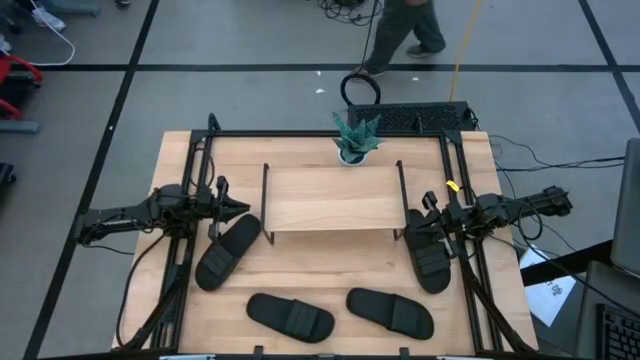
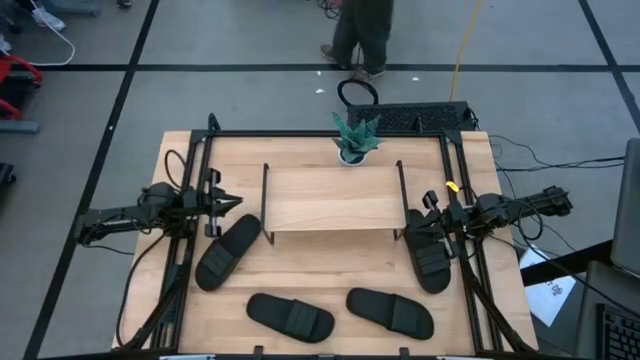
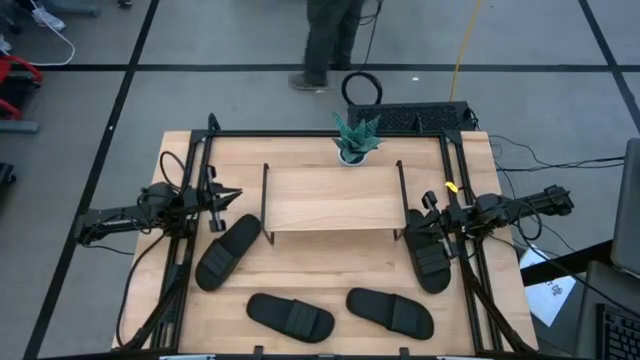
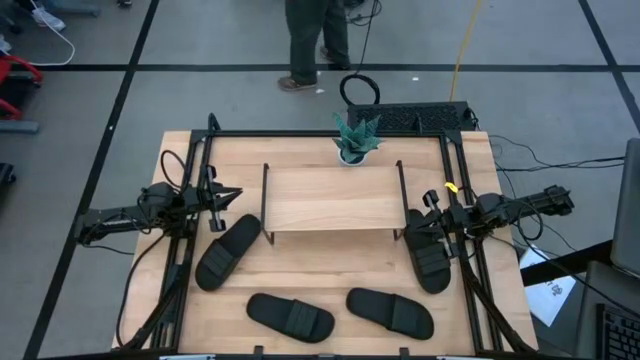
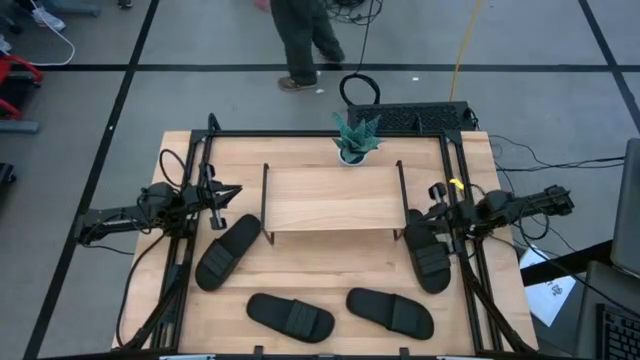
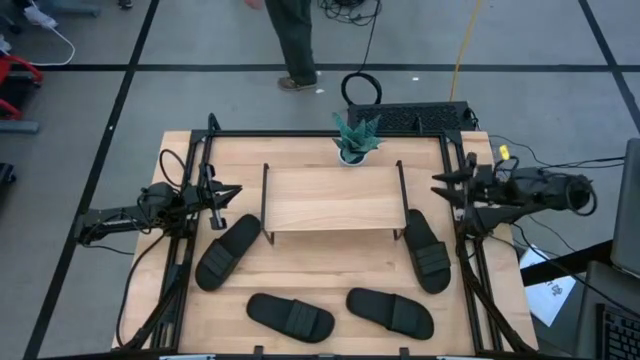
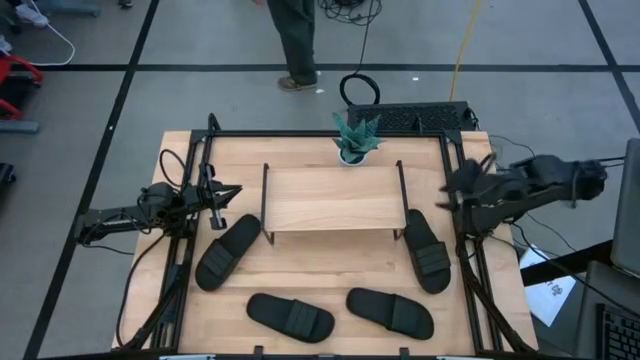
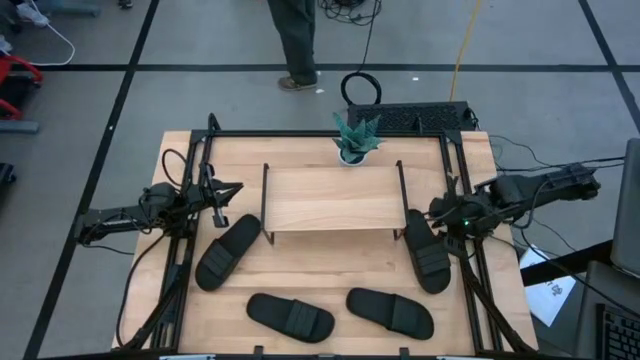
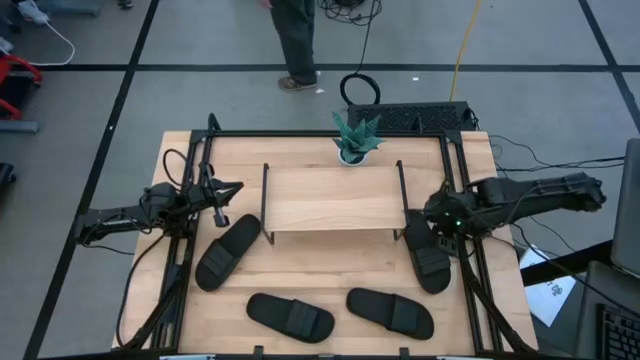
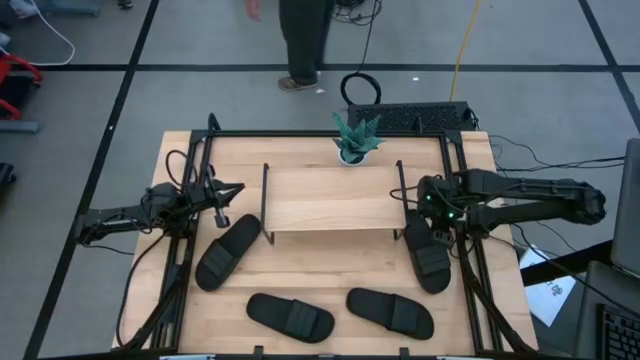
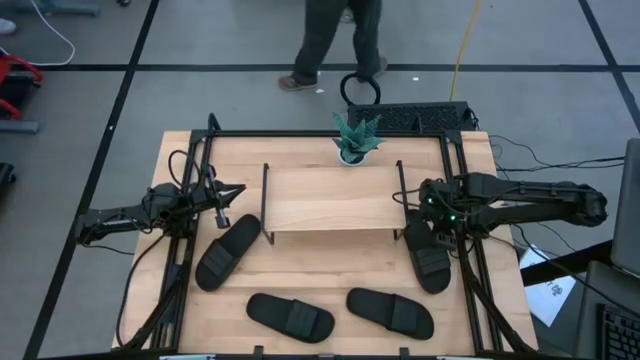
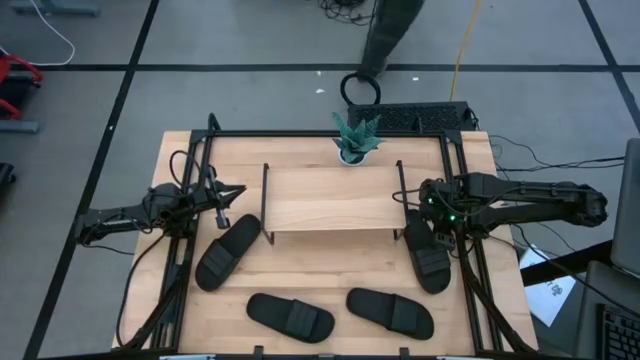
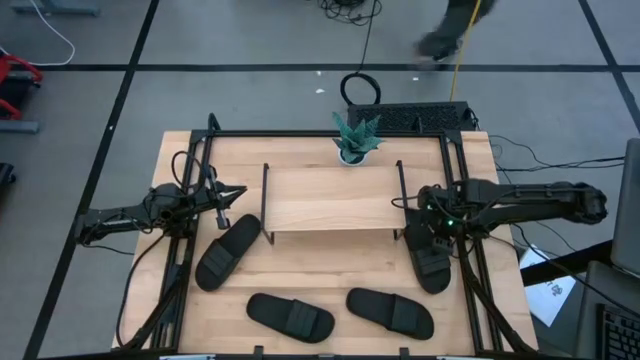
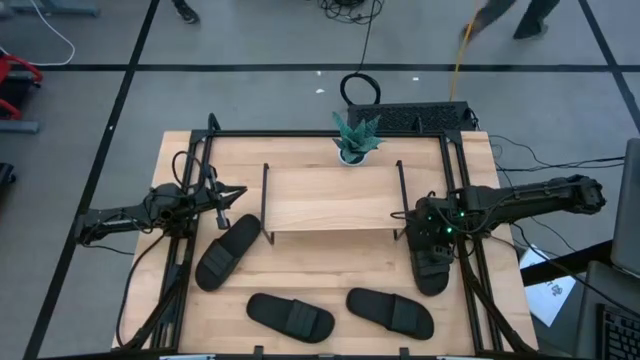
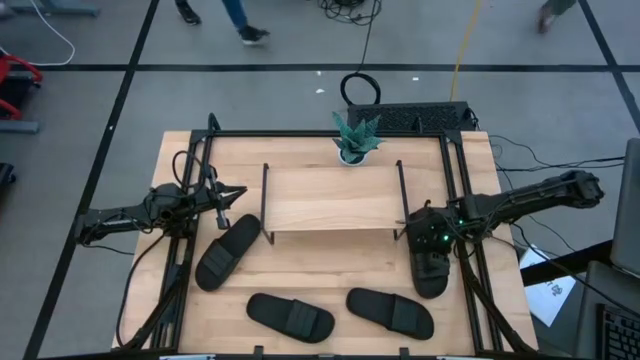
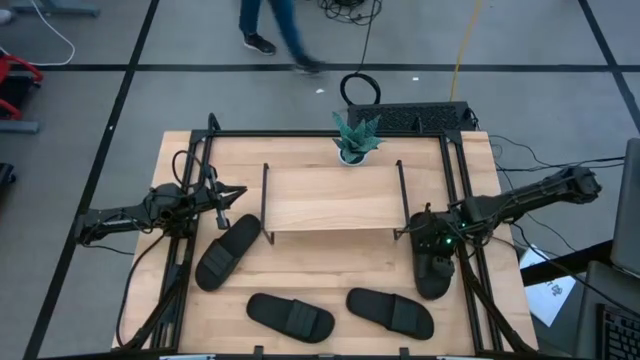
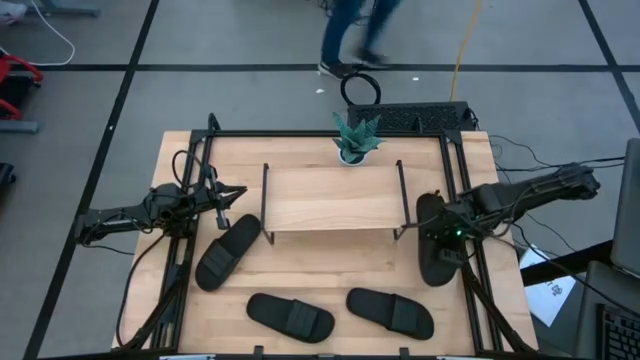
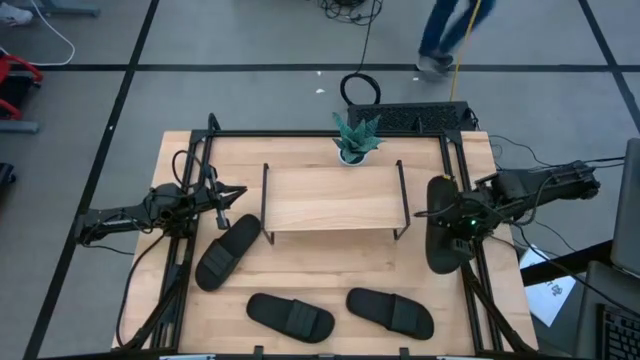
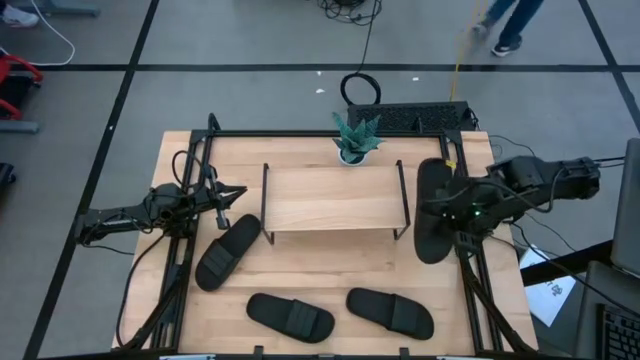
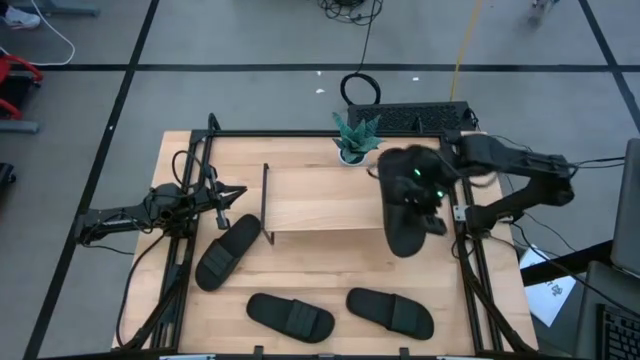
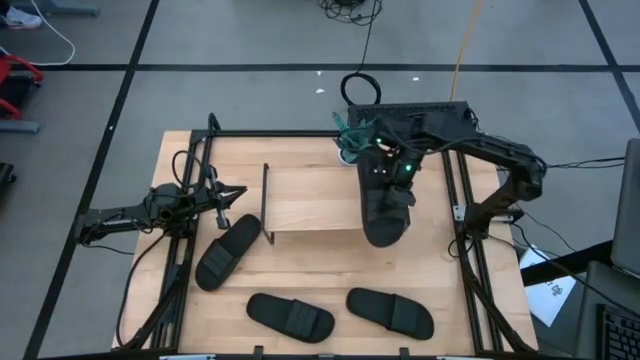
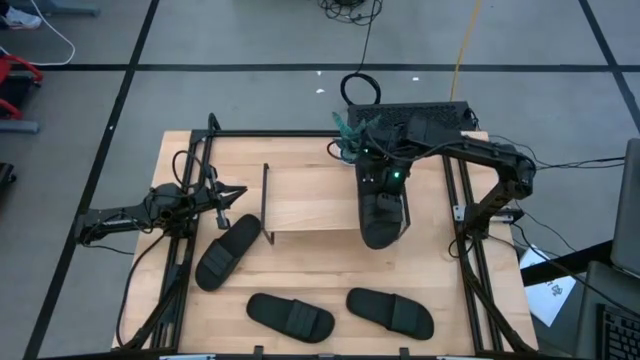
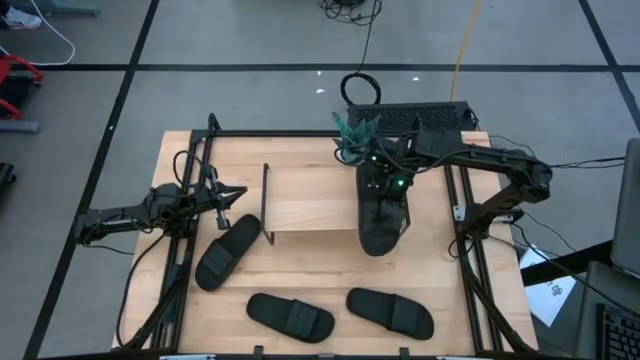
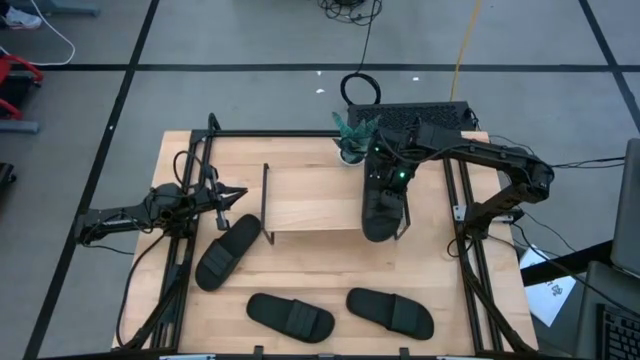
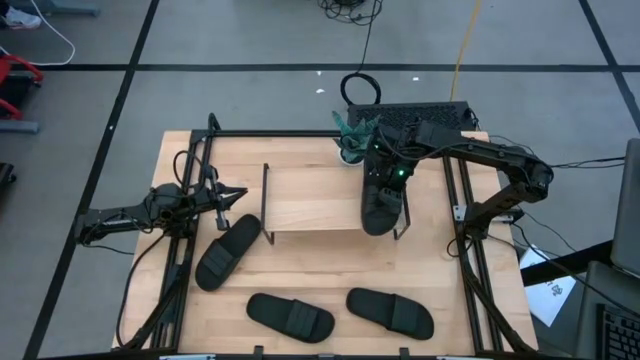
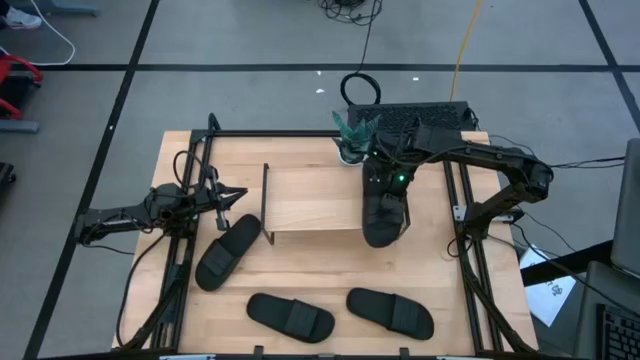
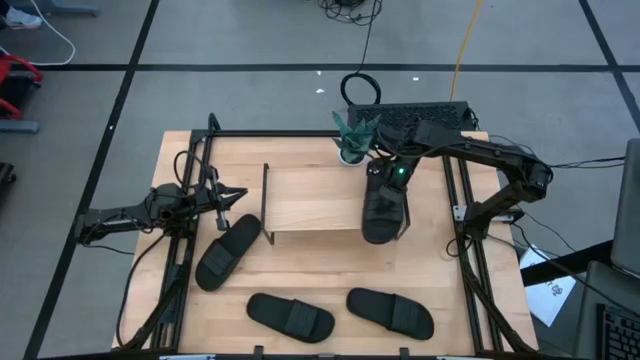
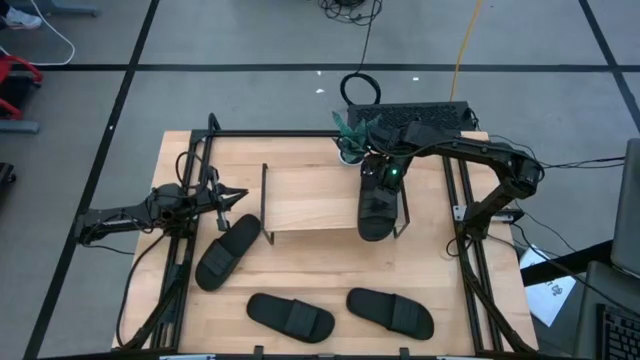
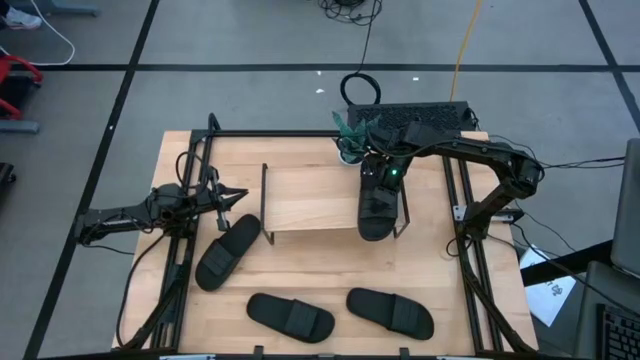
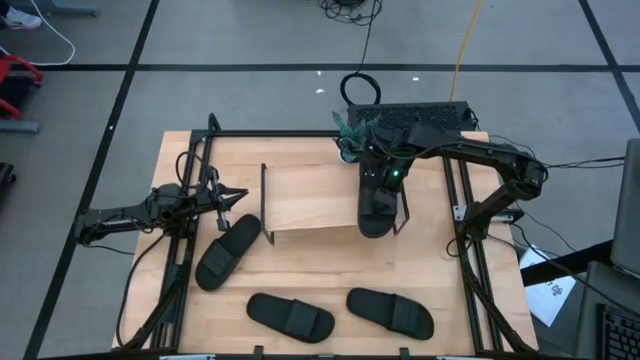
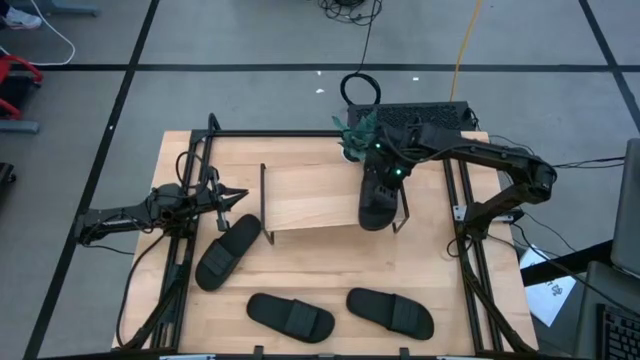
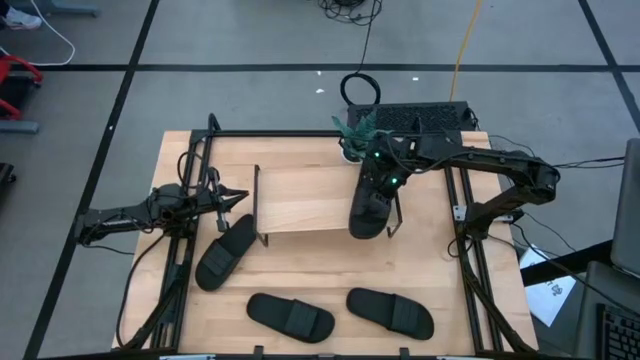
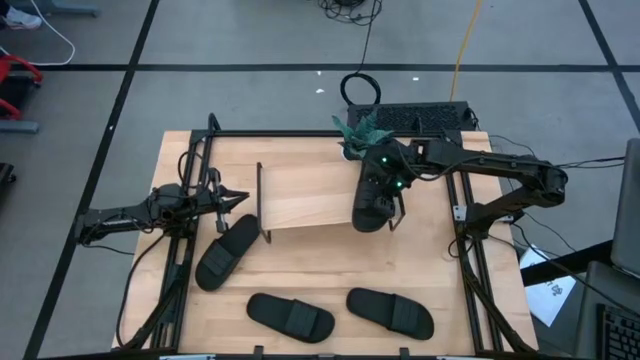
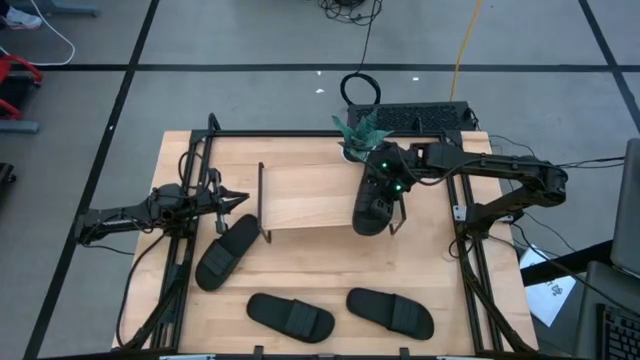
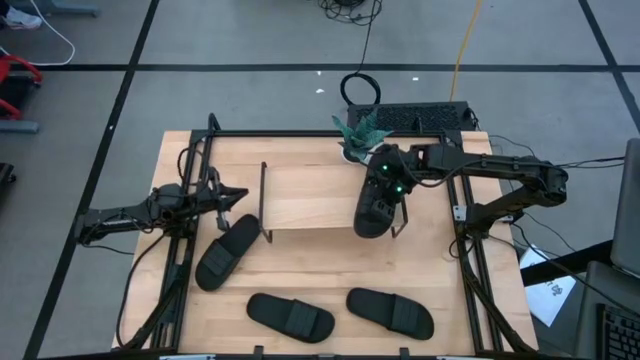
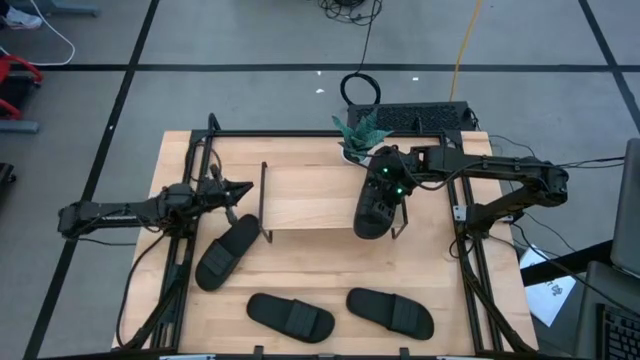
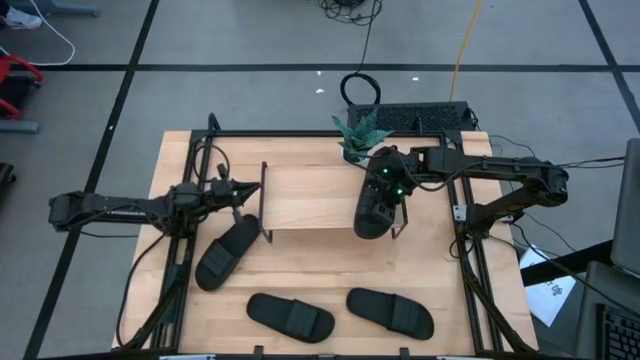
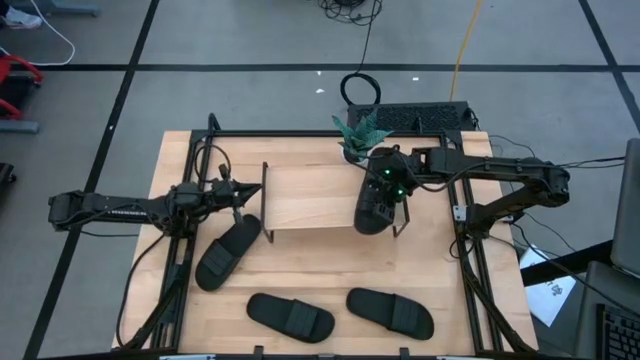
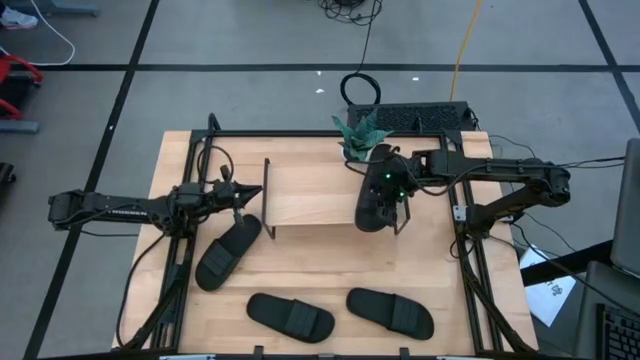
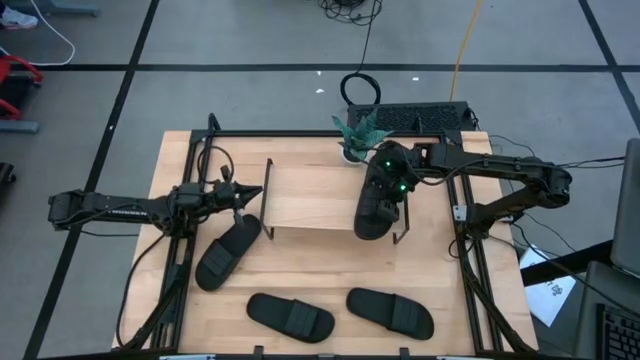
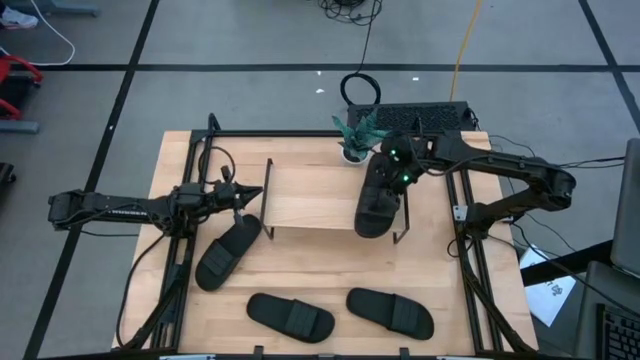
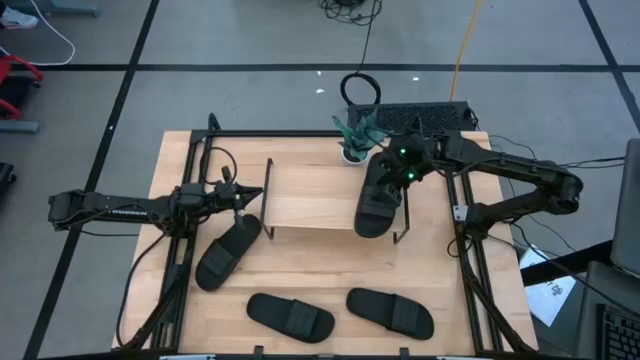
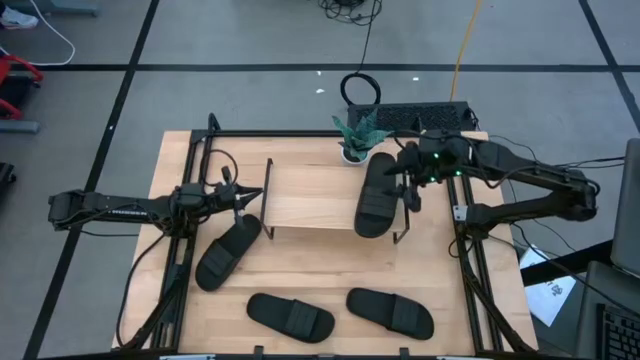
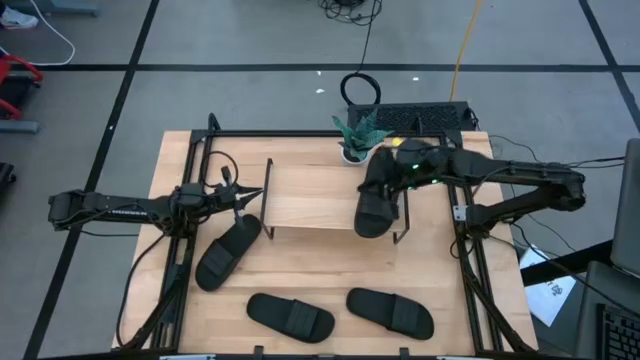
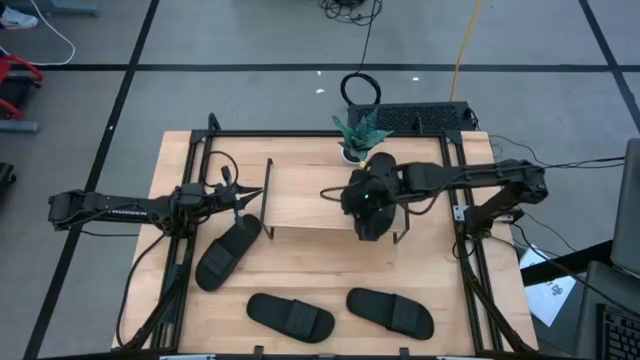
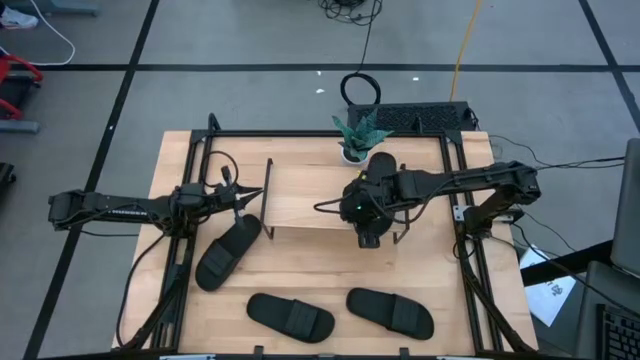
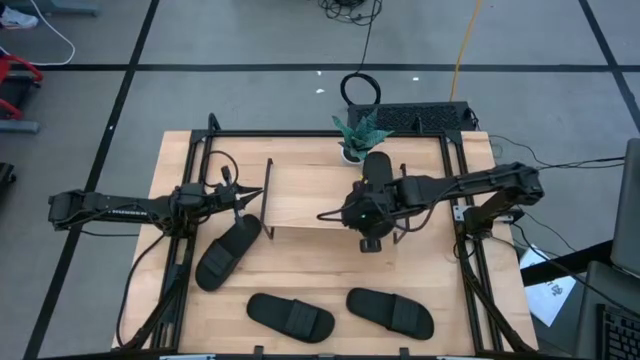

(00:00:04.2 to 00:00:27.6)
Task: Pick and place slides into the shelf
Put the top right black slipper on the shelf
